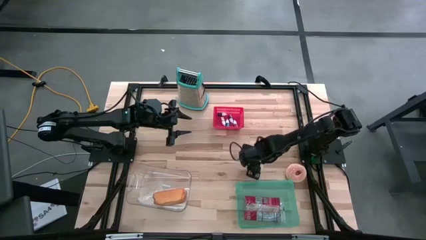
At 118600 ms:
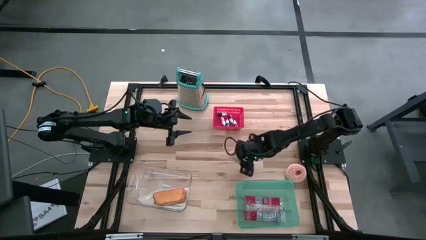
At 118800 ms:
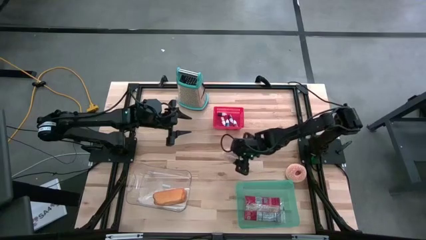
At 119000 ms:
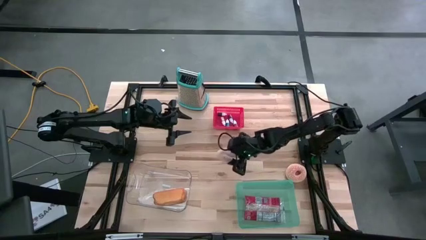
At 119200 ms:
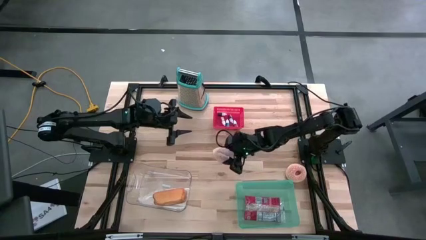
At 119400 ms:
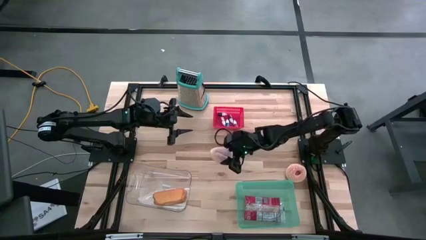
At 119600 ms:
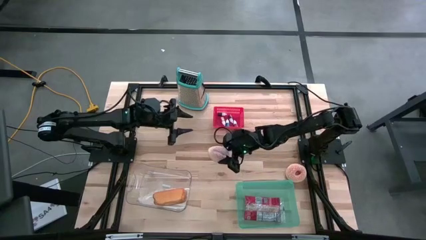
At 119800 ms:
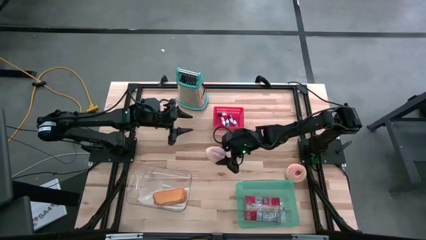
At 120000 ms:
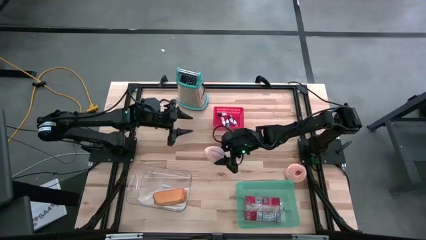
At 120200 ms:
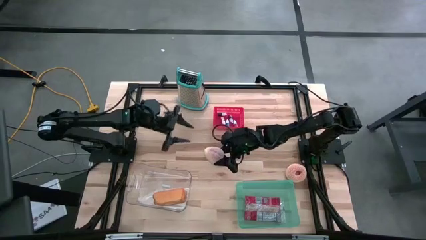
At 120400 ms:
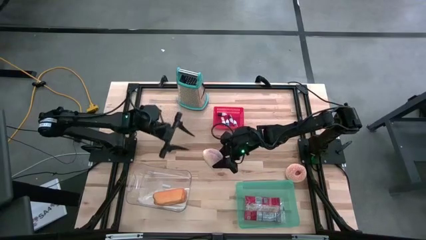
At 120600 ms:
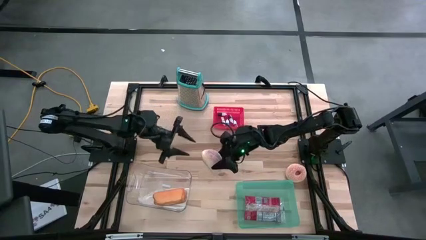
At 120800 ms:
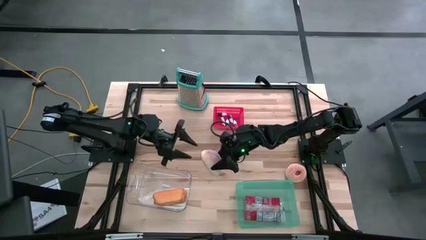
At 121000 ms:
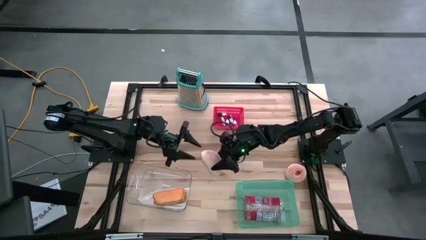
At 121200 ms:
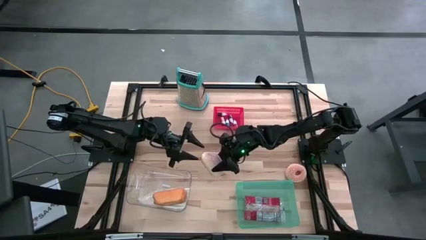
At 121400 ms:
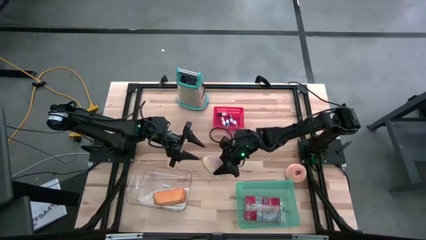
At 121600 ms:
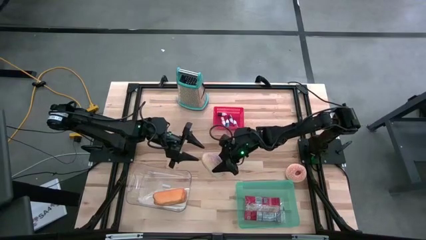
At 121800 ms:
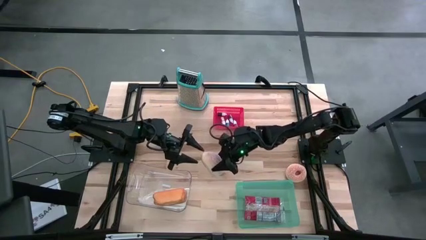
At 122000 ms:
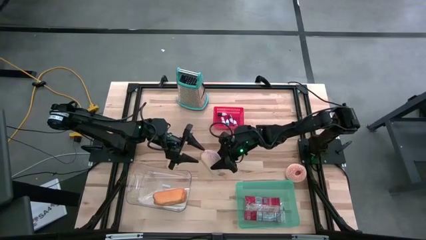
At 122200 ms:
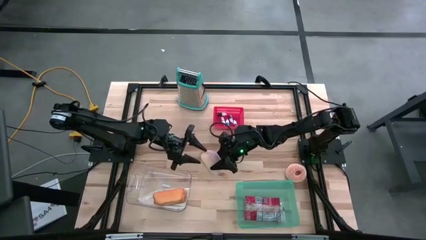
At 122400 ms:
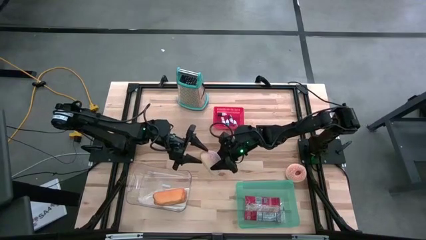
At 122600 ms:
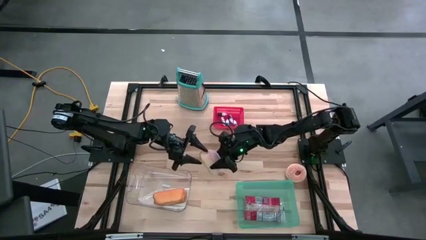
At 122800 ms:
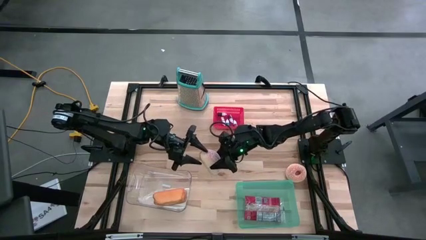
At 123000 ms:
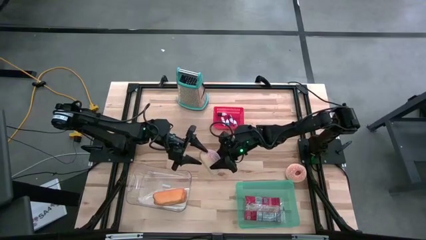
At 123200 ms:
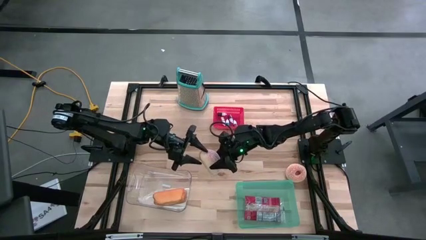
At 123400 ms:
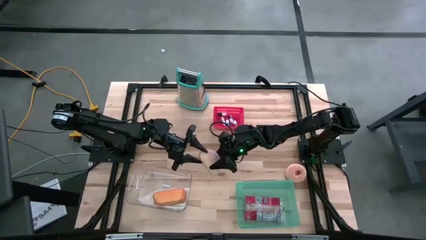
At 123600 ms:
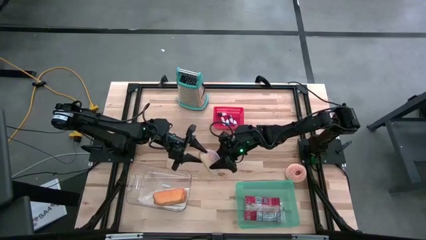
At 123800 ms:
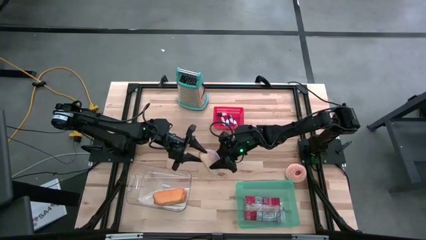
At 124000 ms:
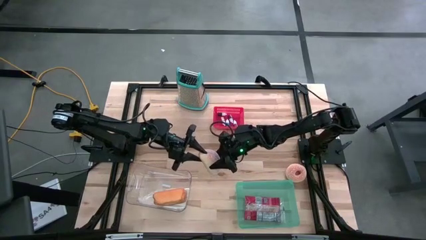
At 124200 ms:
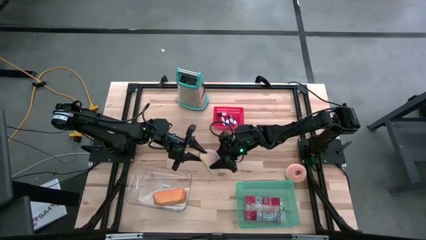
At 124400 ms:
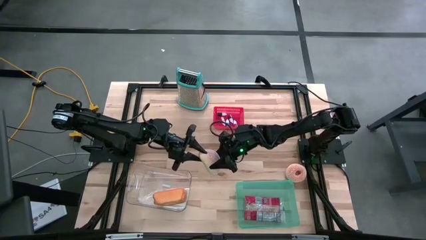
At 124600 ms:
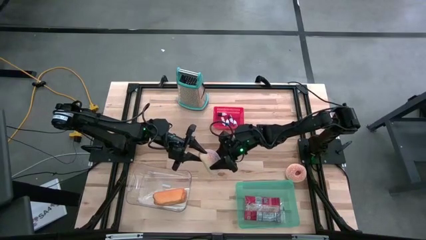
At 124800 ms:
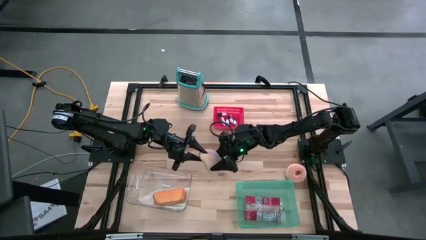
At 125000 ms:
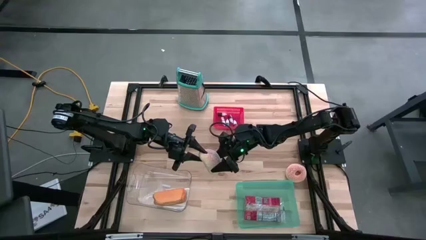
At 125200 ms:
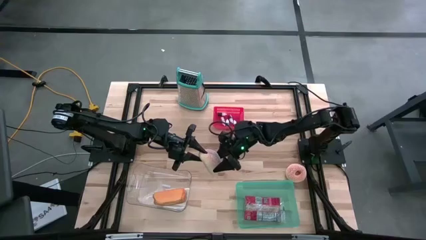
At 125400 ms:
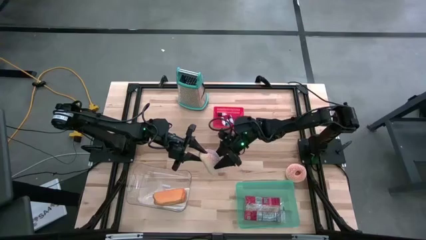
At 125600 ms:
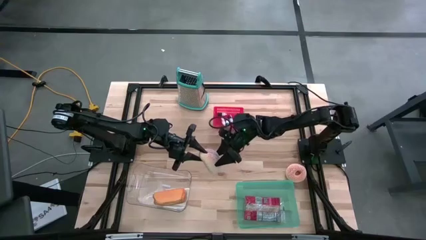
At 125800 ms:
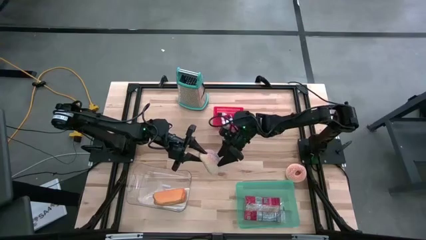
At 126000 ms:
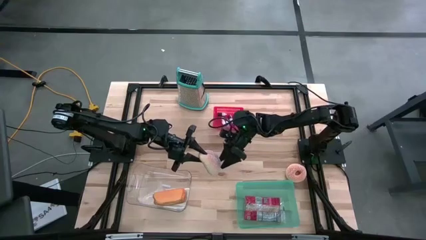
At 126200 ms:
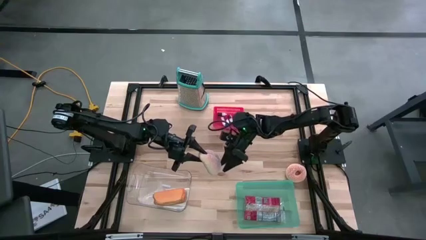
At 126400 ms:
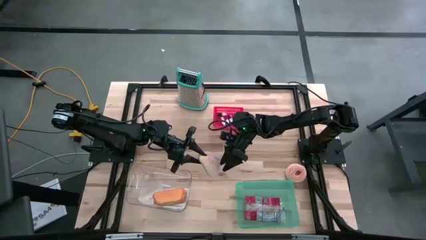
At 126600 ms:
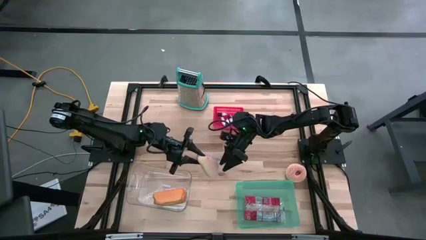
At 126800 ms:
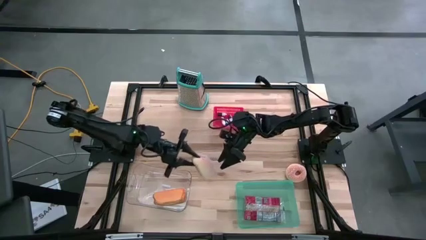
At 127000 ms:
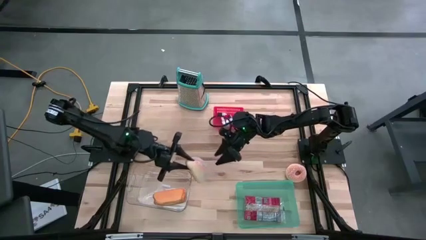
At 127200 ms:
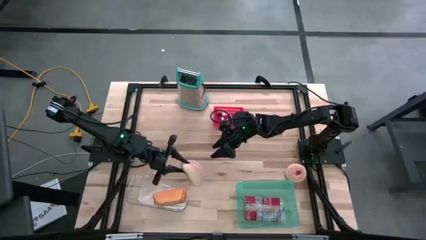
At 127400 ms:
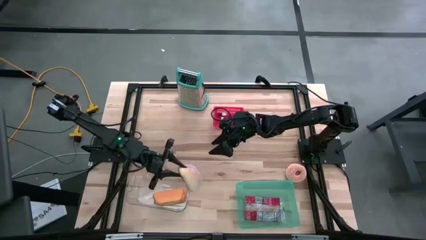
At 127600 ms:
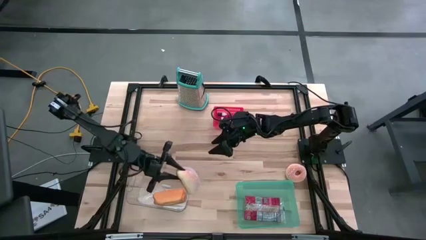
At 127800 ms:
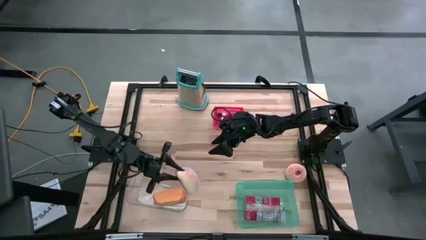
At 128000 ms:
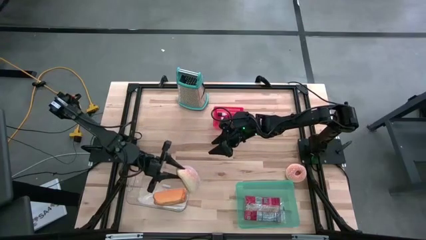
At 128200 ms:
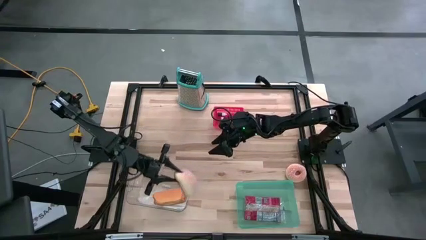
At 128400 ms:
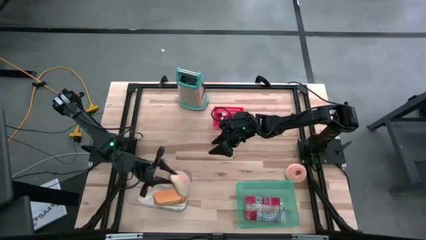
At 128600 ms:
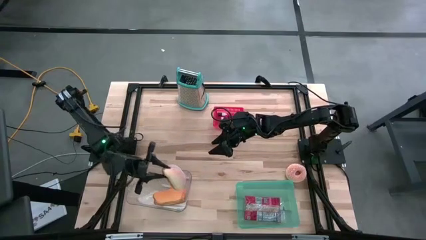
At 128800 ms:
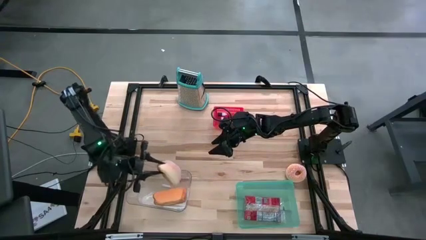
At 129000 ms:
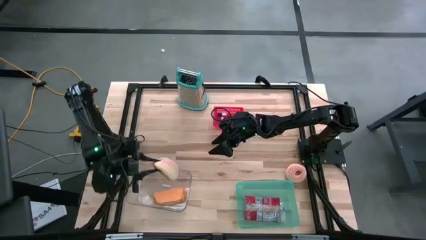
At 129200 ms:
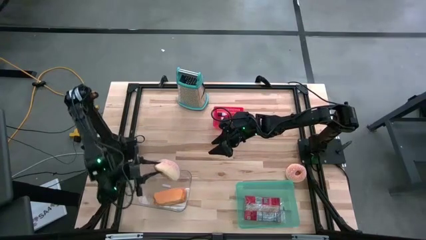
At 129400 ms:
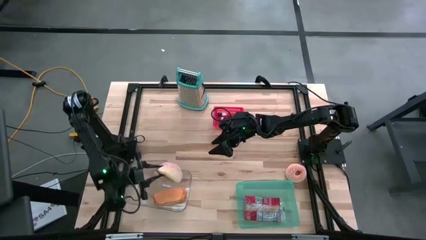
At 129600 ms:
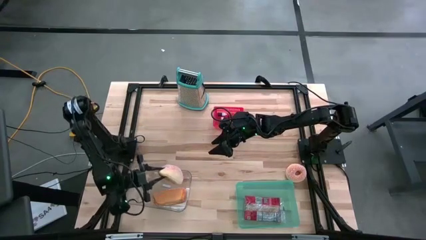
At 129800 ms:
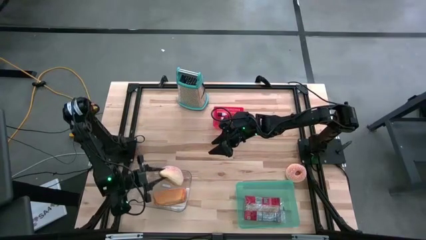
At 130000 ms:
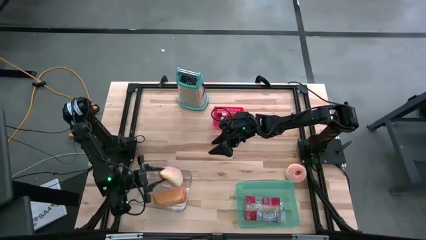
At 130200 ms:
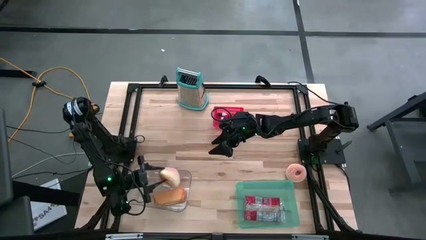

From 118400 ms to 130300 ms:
Put the bread into the transparent bin
